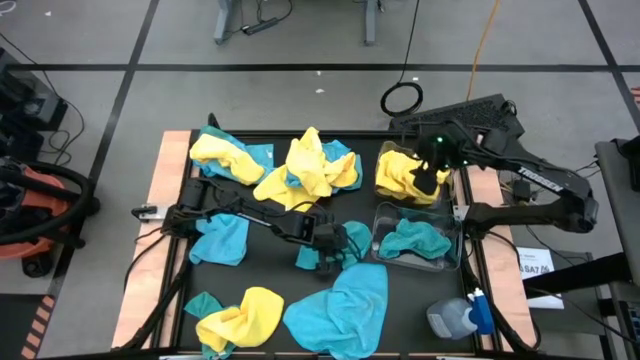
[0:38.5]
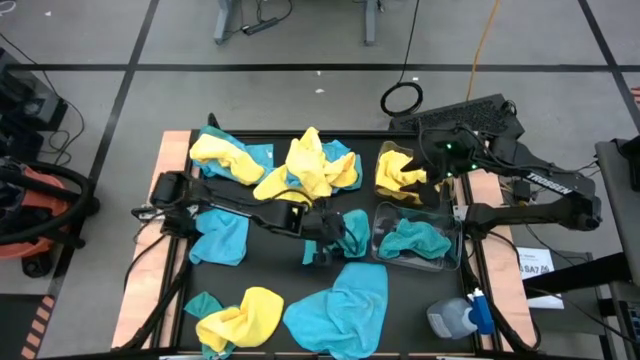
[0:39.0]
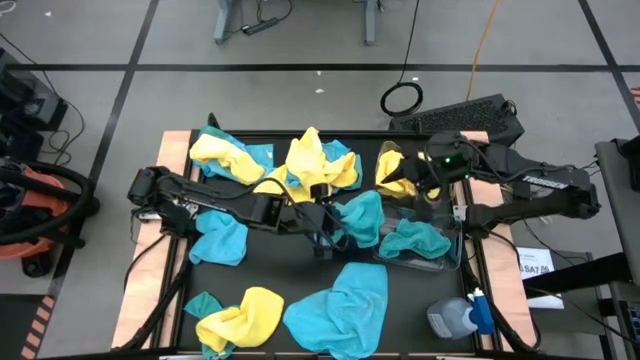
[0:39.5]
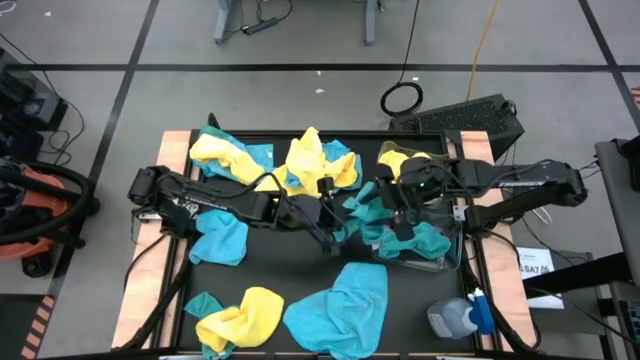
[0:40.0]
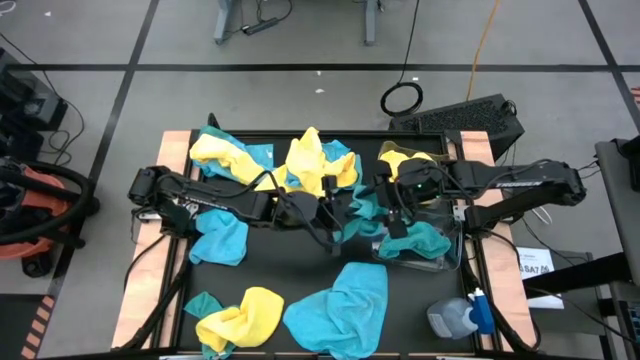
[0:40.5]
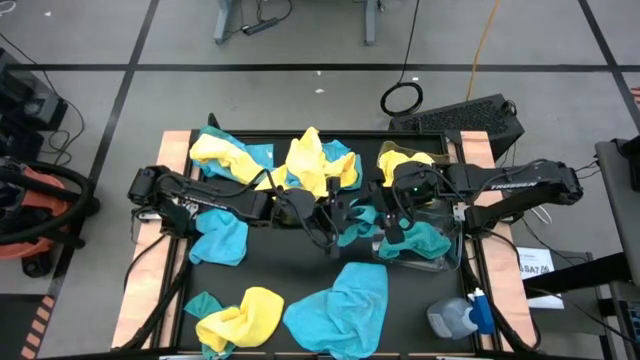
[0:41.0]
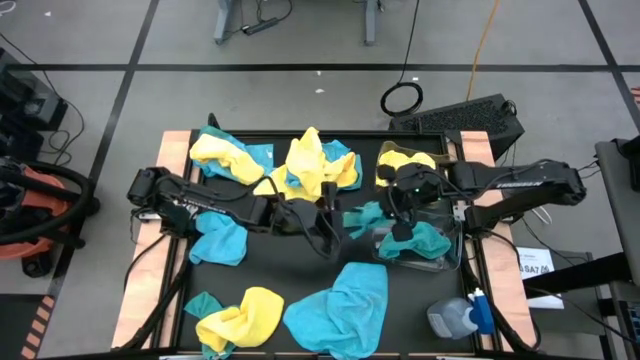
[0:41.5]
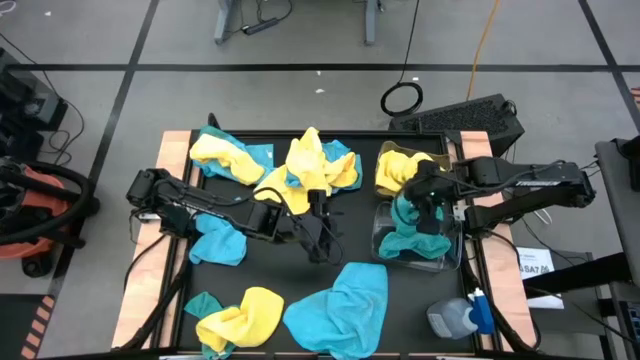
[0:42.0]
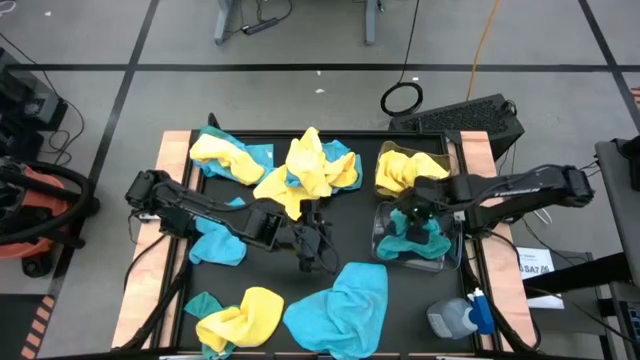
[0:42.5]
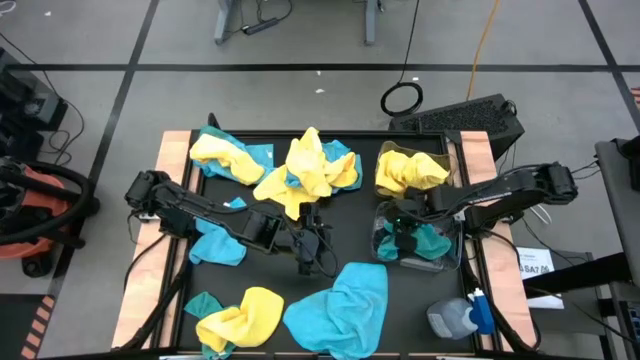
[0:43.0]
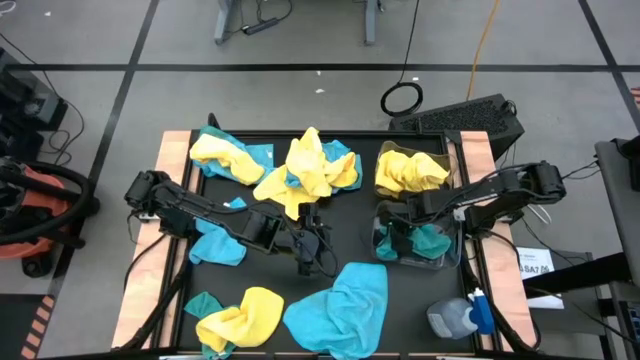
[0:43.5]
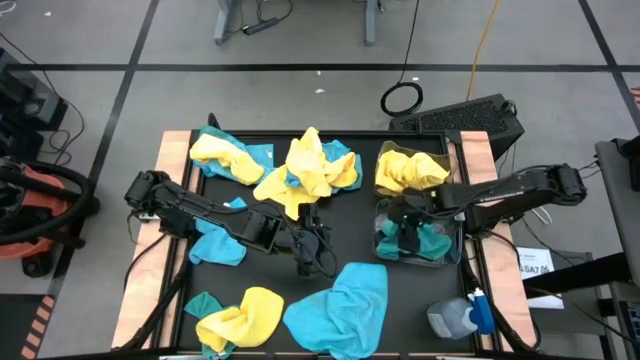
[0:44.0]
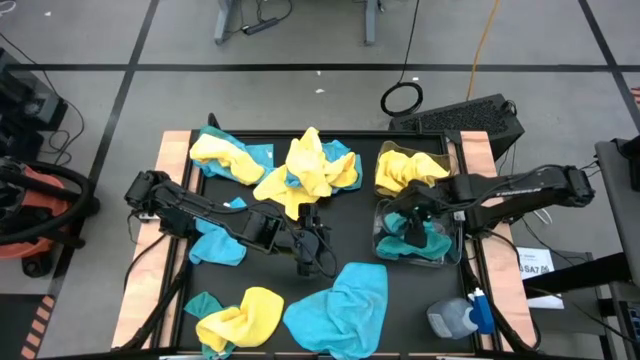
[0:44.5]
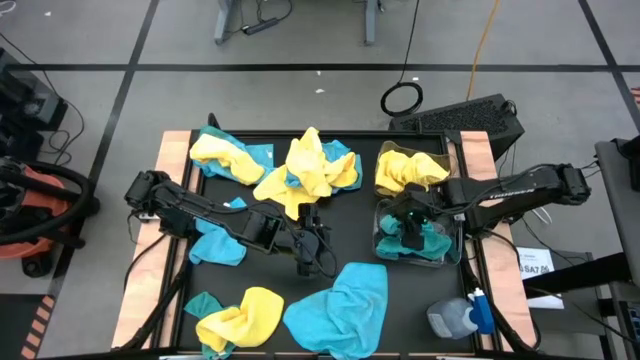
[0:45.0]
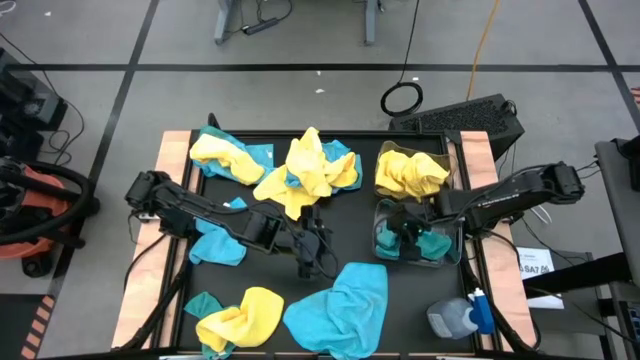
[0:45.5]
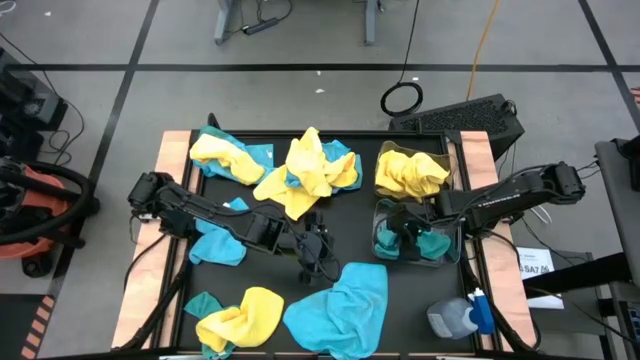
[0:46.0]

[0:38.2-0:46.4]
Task: Sort microfiber towel by color & place in baskets
Put the blue microfiber cloth into the bottom transparent bin

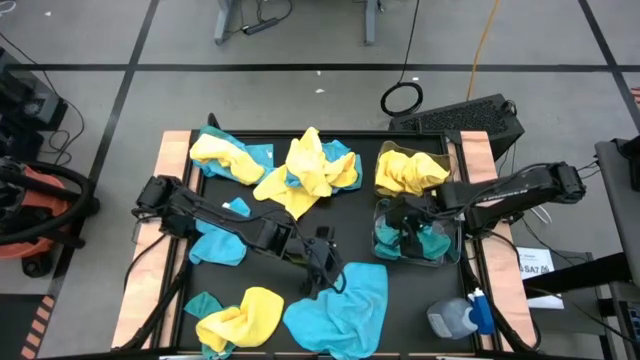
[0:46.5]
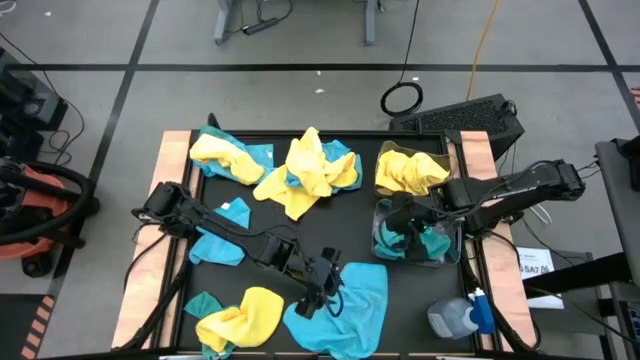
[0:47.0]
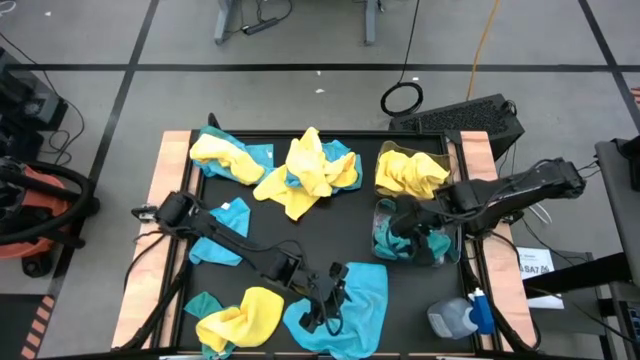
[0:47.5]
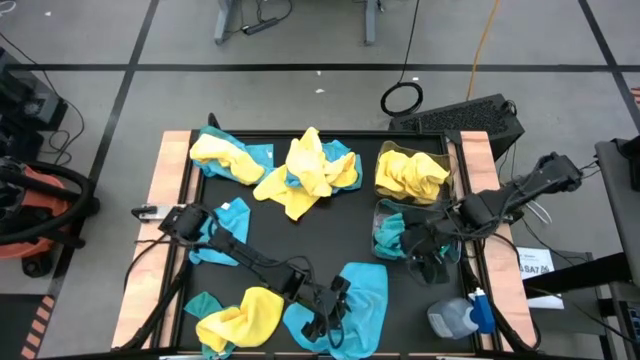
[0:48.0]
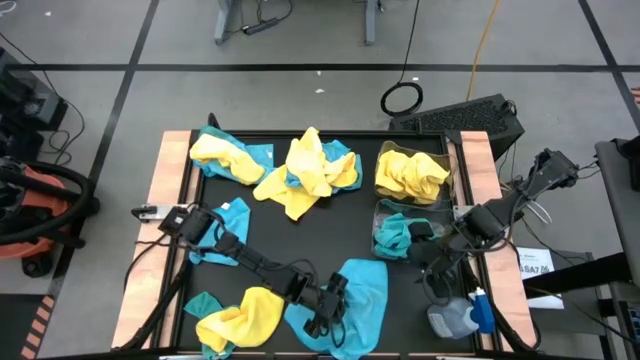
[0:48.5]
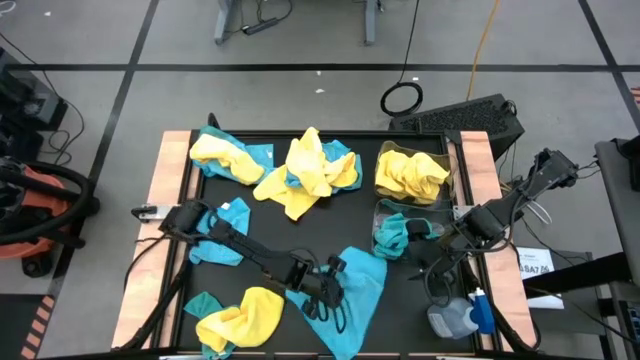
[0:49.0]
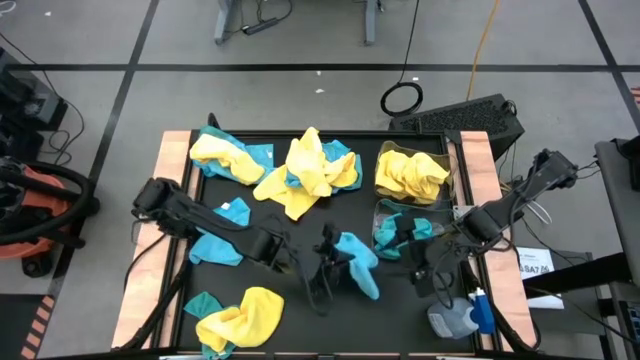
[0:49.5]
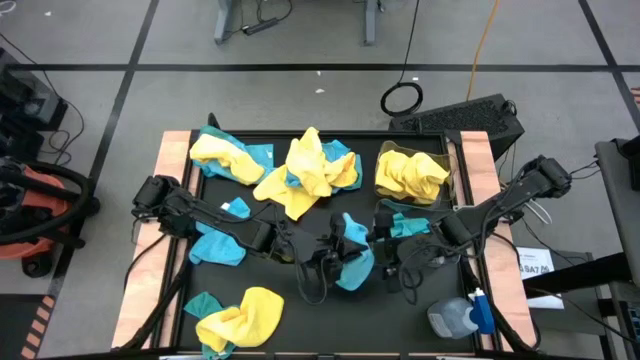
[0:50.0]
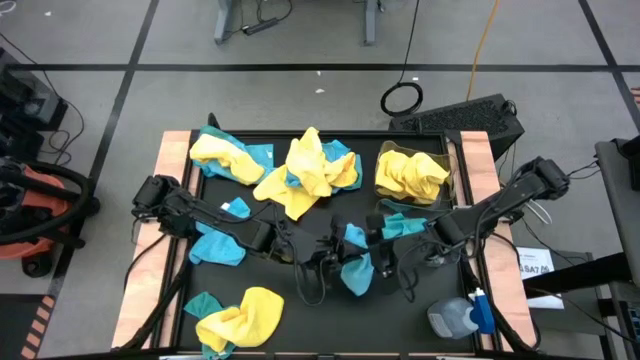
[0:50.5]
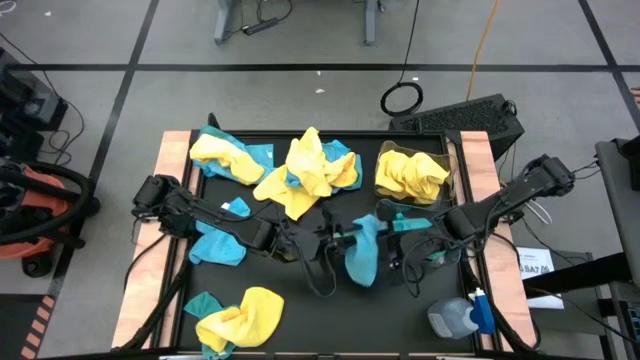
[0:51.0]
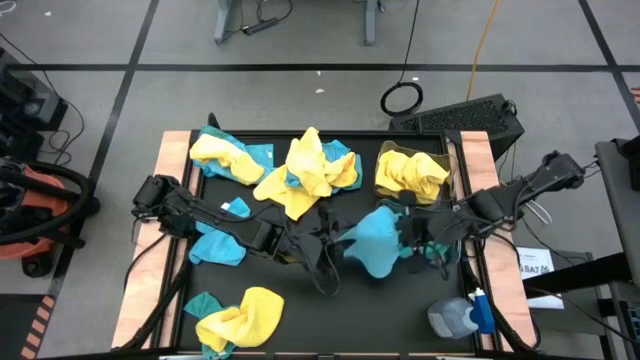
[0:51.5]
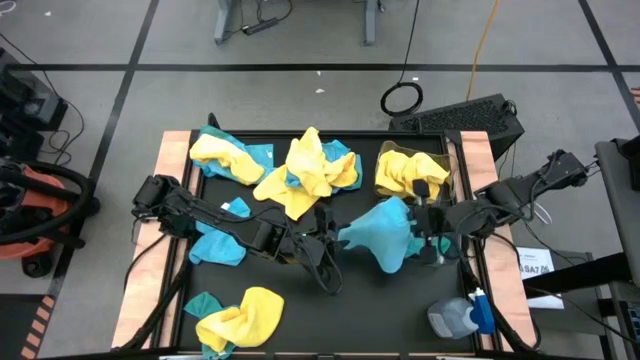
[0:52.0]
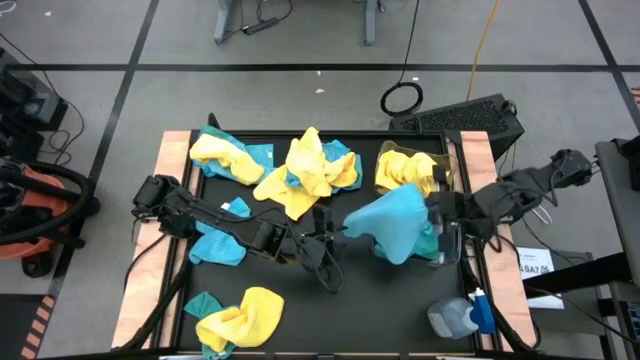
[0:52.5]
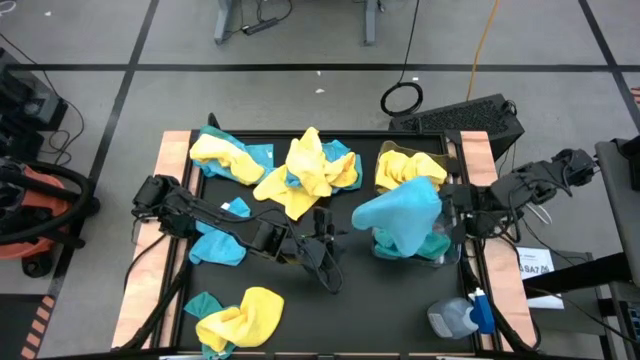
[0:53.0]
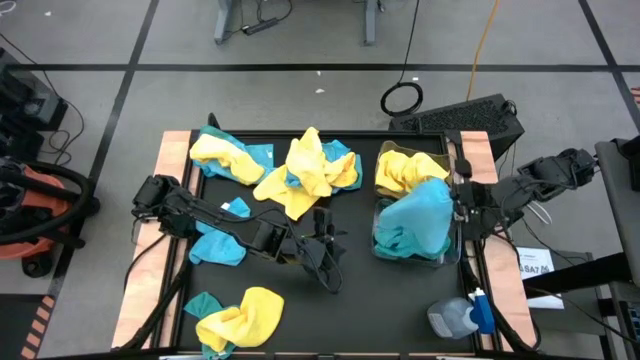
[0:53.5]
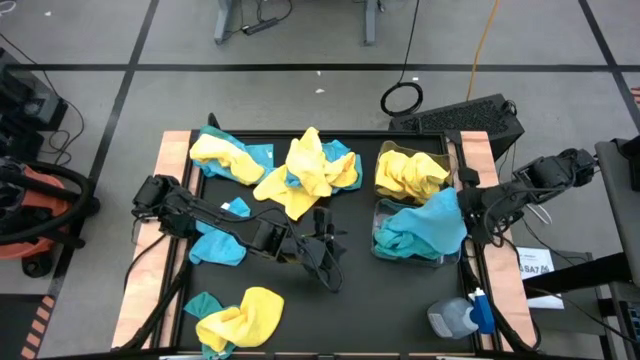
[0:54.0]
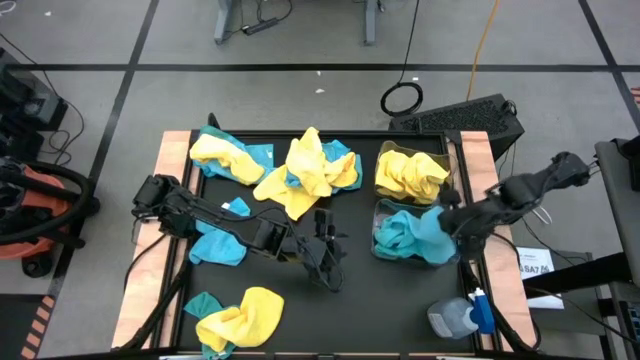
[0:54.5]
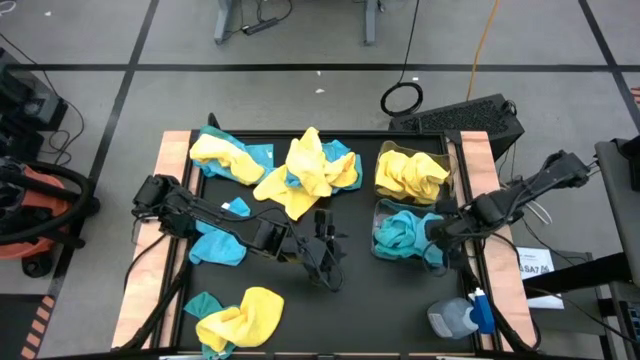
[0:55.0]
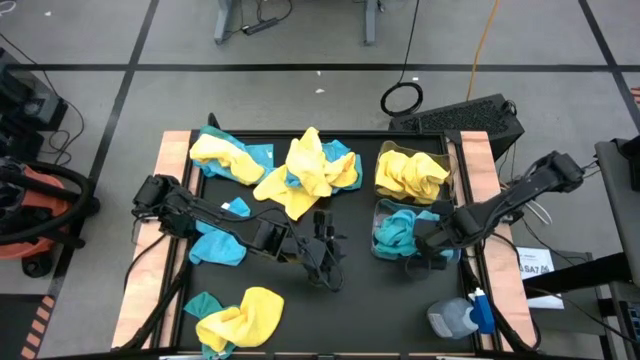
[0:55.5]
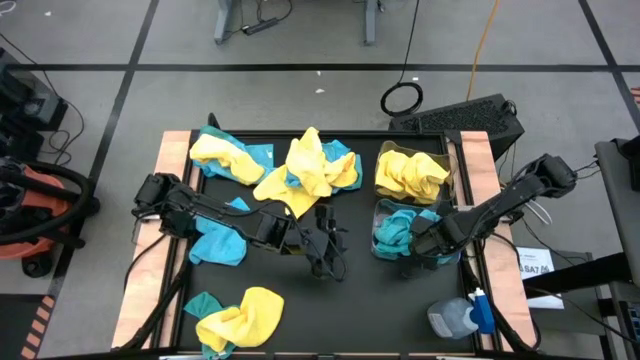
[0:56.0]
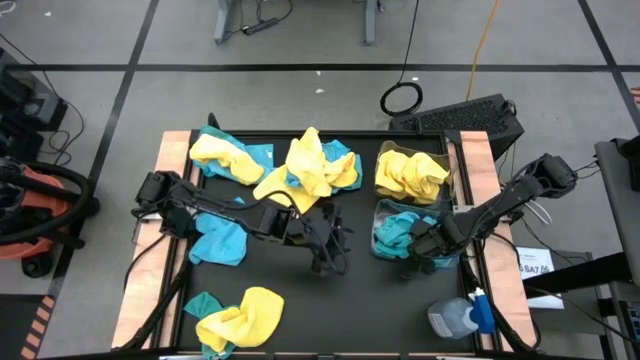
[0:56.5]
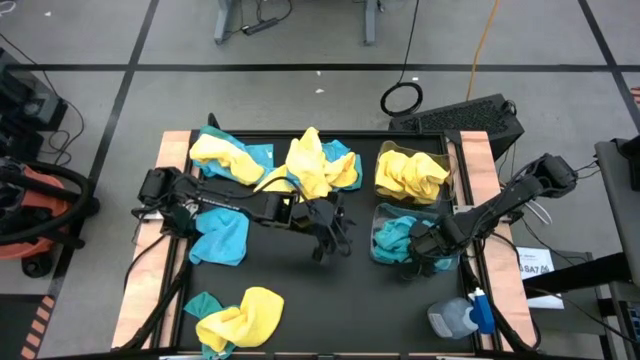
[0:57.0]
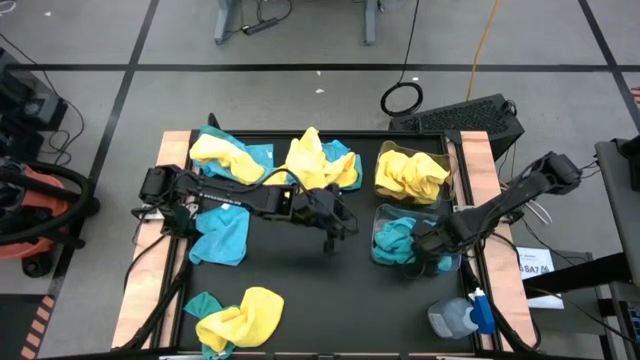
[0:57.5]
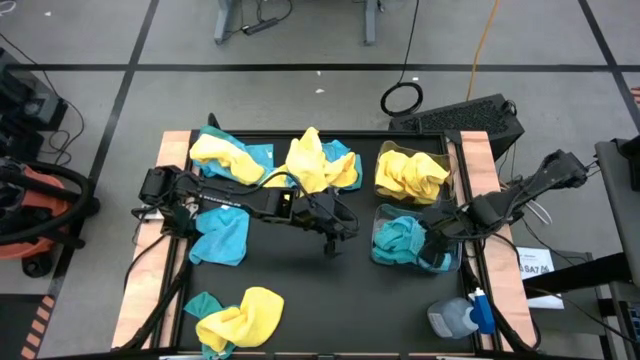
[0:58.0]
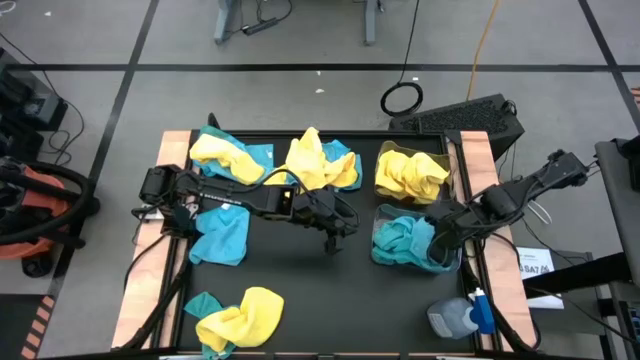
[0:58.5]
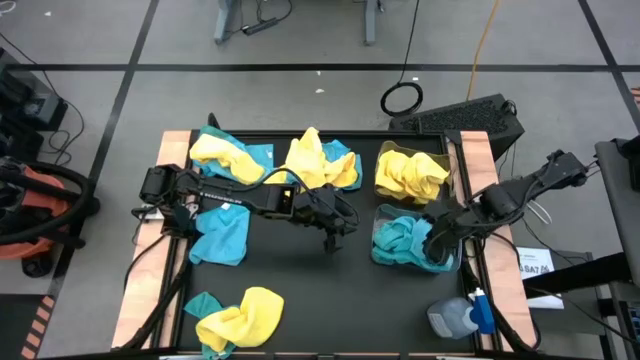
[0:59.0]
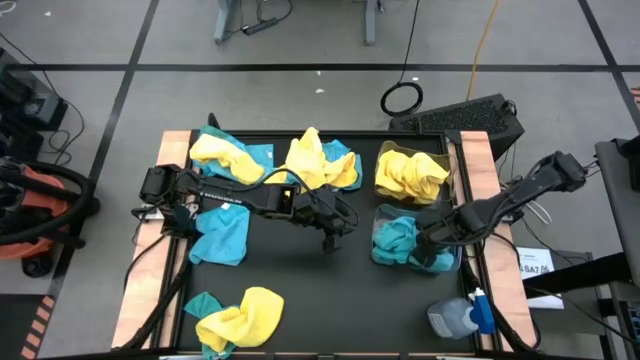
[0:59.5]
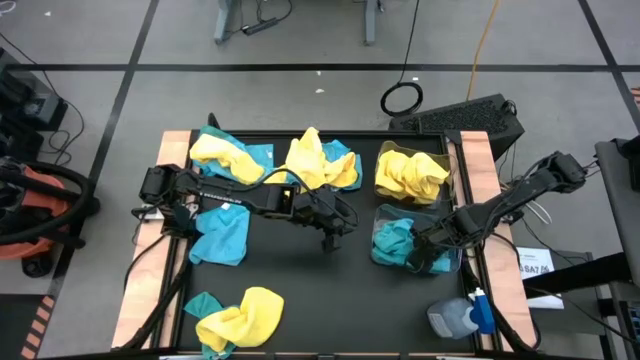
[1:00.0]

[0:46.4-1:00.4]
Put the blue microfiber cloth into the bottom transparent bin
